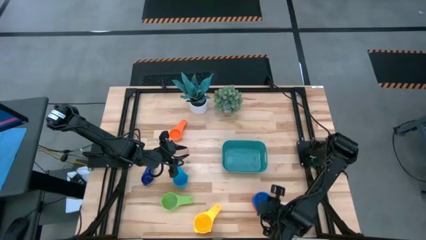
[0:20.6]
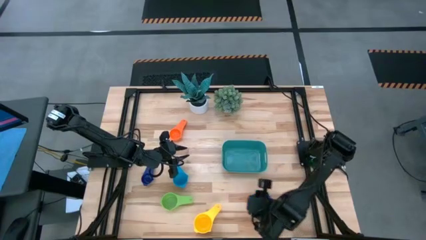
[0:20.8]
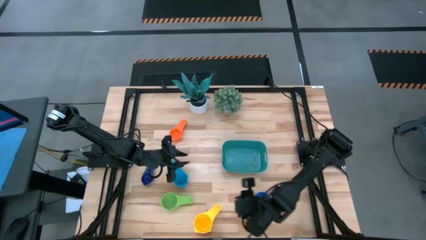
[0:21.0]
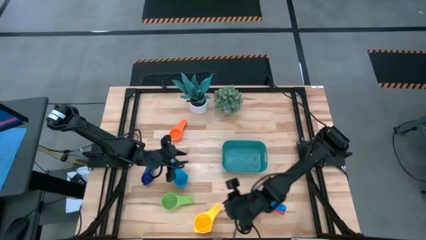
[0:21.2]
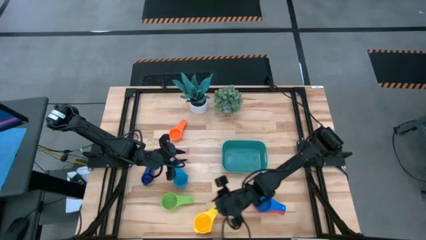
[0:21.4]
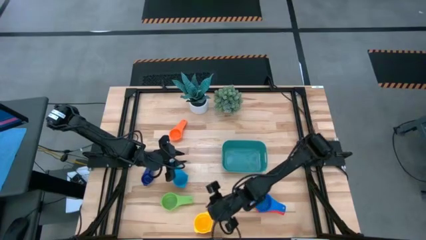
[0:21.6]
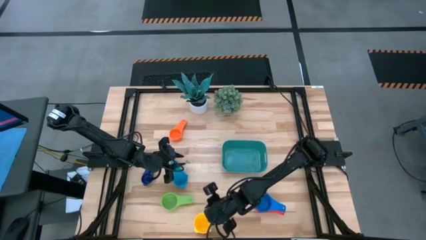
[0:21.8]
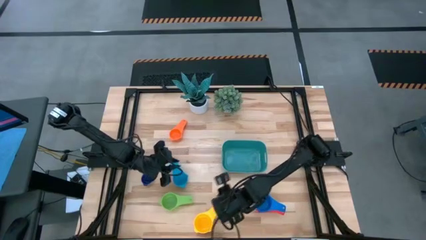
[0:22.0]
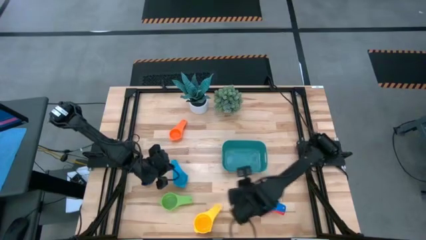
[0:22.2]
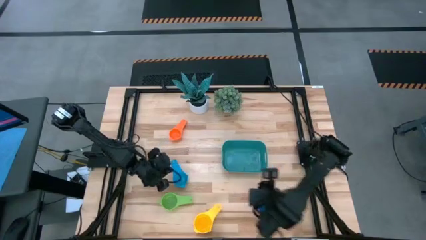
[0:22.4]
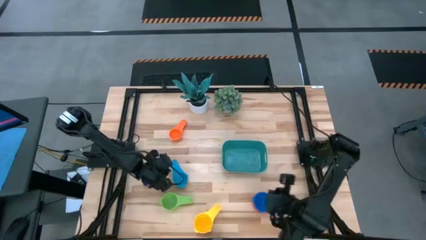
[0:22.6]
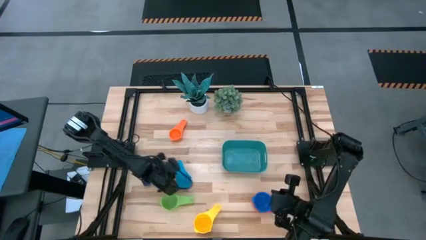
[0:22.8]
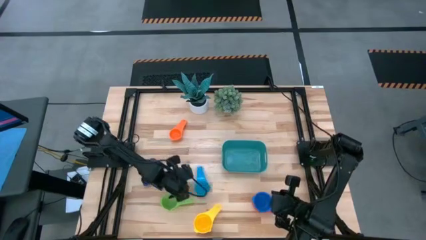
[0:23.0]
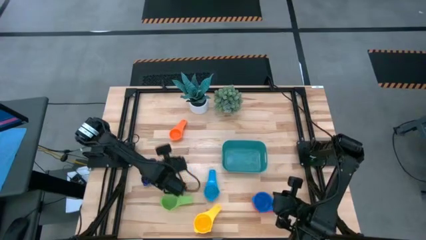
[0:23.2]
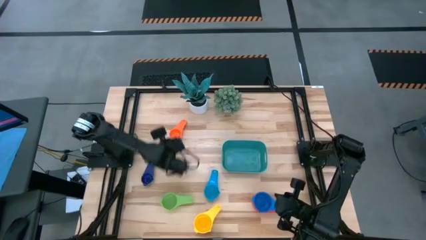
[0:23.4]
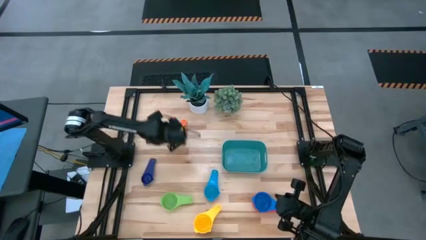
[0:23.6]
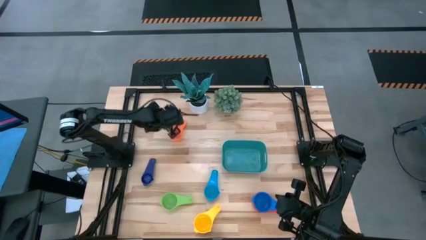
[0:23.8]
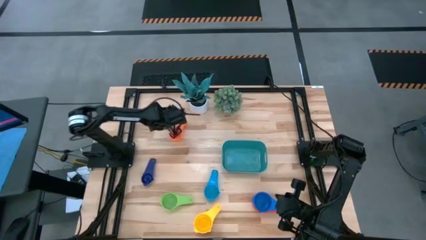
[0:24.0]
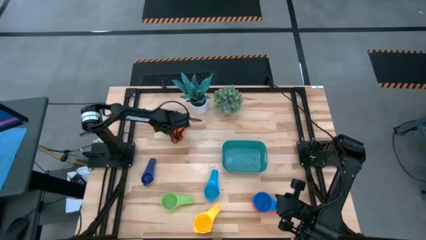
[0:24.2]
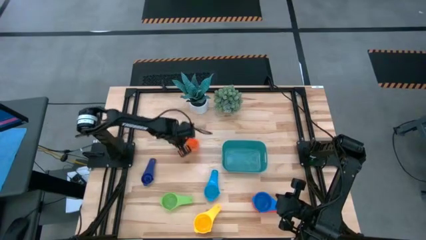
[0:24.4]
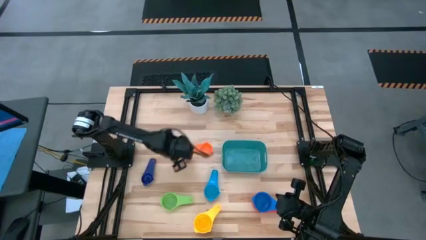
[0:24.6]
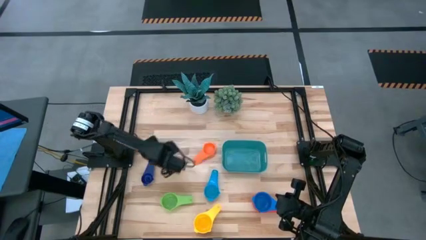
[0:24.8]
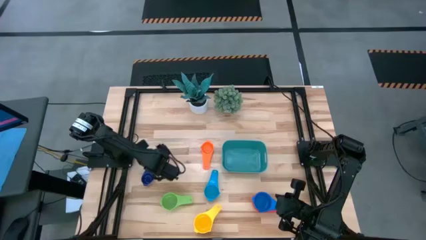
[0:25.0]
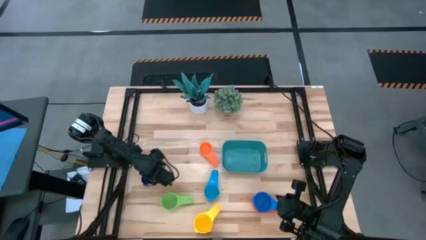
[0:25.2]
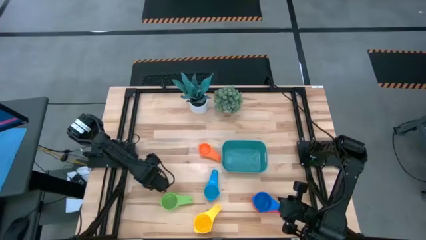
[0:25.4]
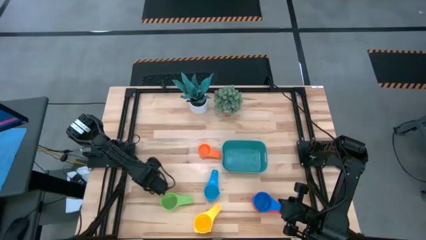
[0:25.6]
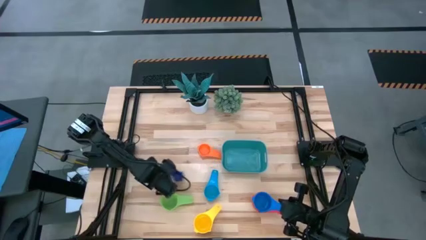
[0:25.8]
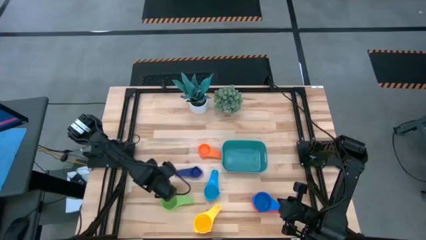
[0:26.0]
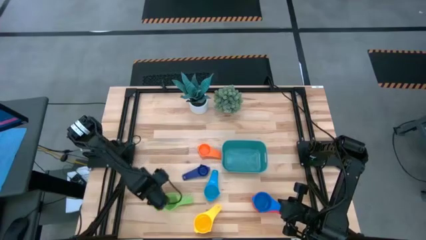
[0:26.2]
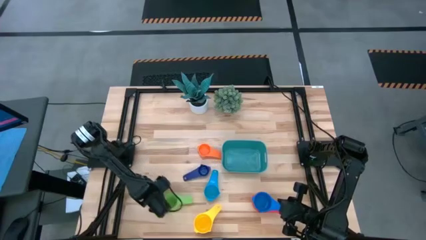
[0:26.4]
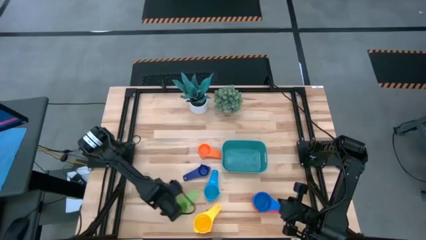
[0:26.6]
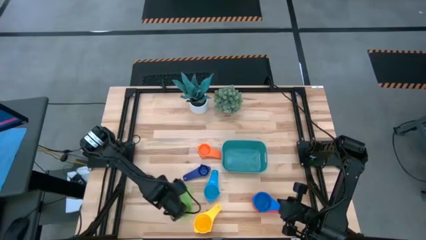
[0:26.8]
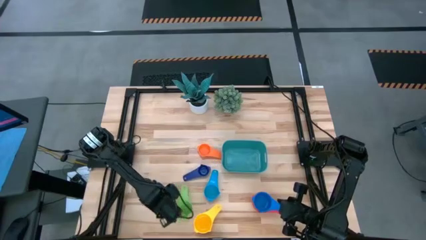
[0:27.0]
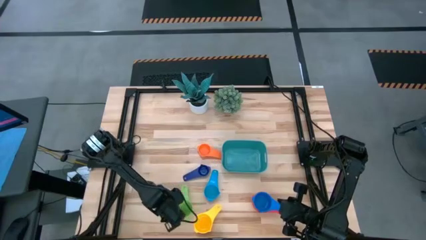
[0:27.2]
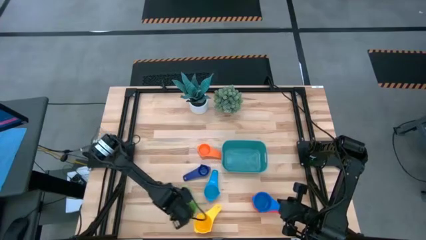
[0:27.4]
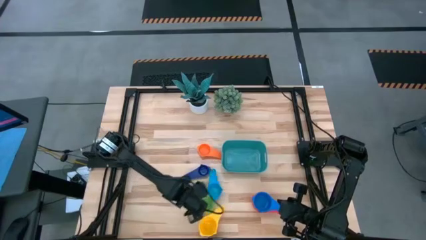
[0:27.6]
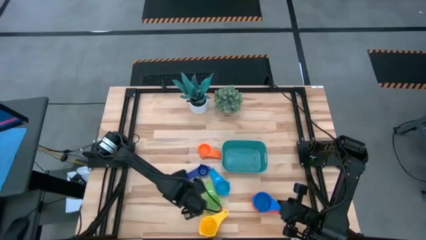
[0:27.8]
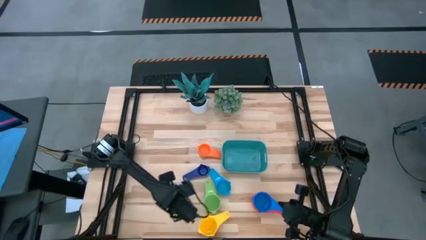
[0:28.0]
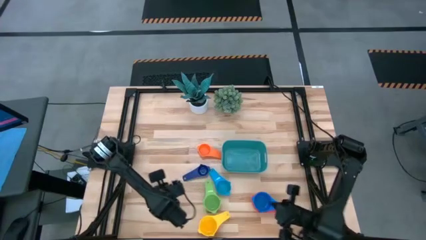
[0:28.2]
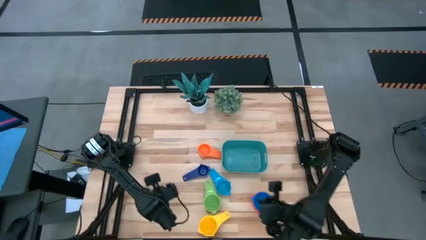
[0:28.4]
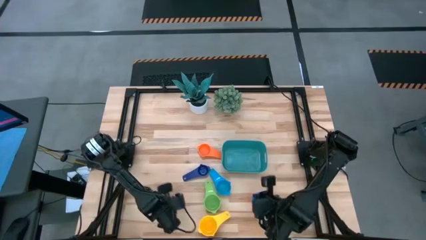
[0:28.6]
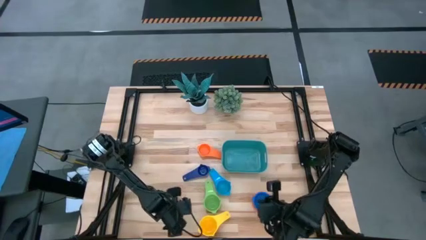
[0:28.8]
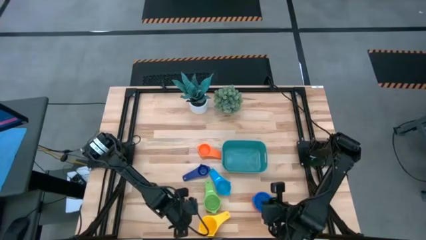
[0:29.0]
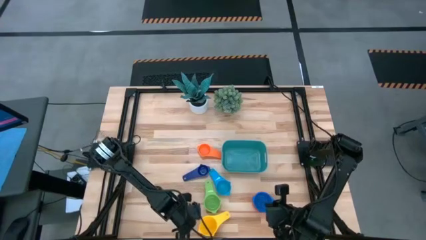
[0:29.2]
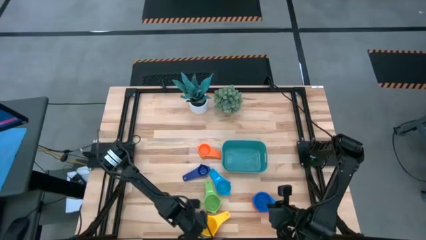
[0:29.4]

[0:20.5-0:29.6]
Task: Nest measuring cups in basket
Prepare the measuring cups

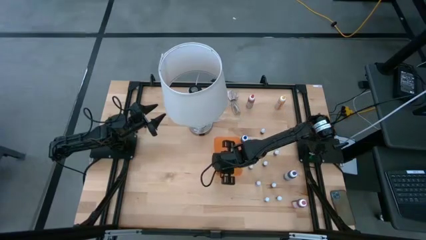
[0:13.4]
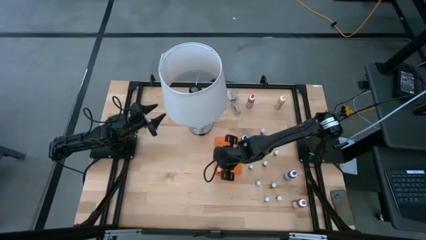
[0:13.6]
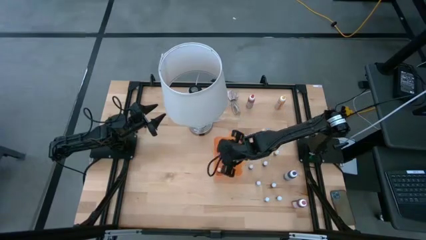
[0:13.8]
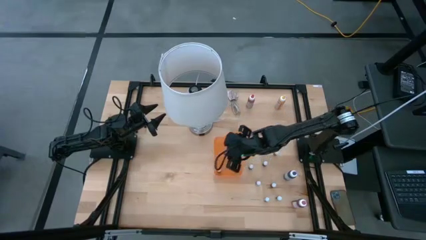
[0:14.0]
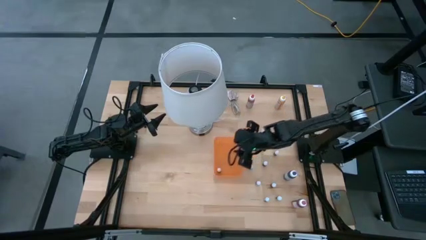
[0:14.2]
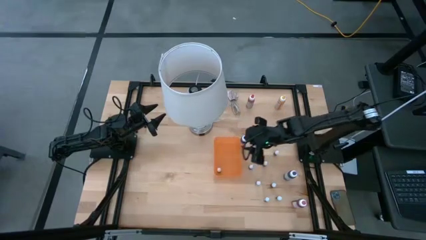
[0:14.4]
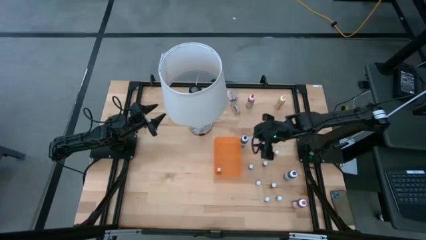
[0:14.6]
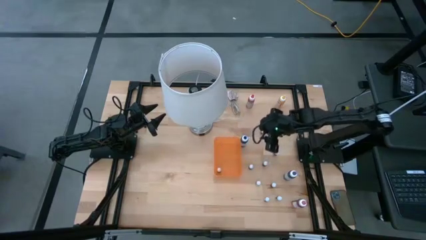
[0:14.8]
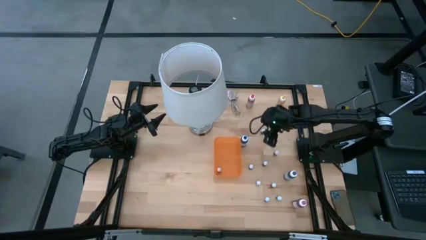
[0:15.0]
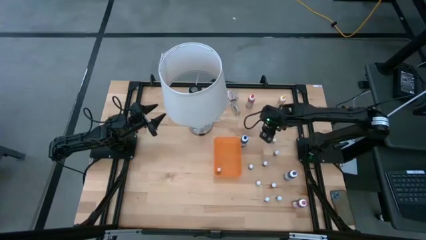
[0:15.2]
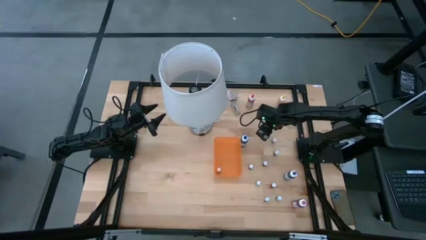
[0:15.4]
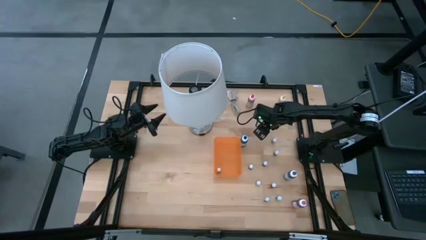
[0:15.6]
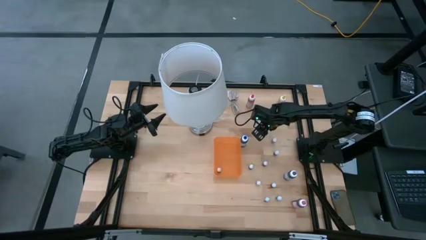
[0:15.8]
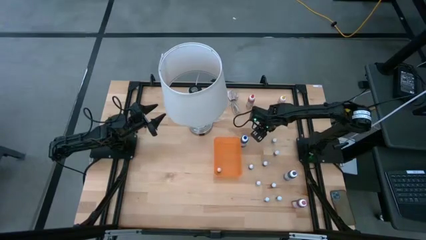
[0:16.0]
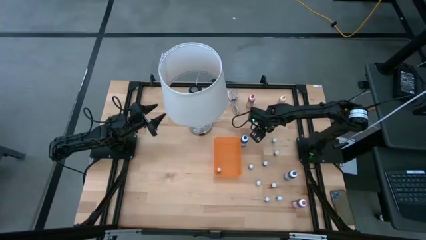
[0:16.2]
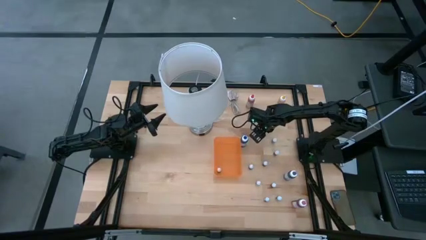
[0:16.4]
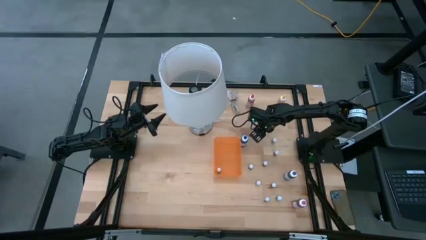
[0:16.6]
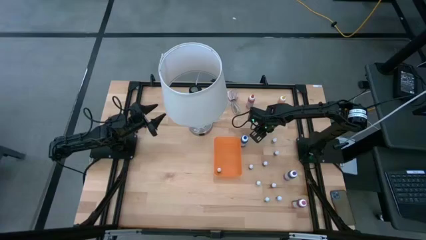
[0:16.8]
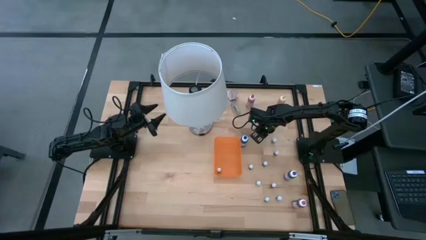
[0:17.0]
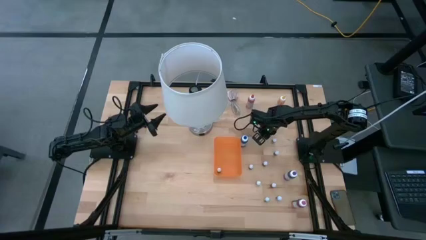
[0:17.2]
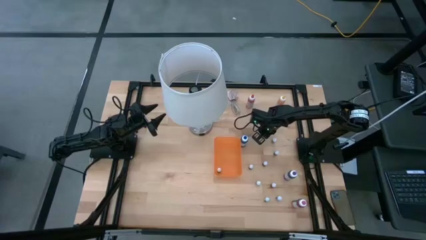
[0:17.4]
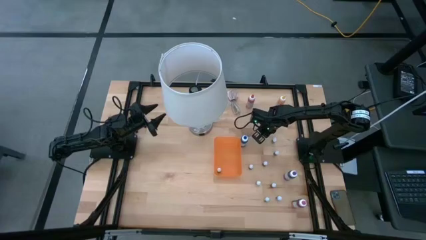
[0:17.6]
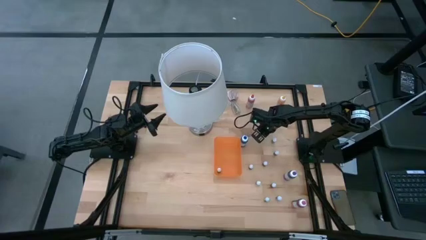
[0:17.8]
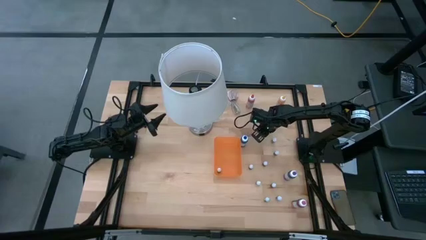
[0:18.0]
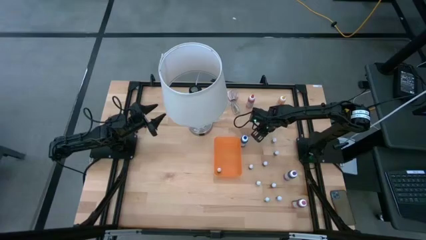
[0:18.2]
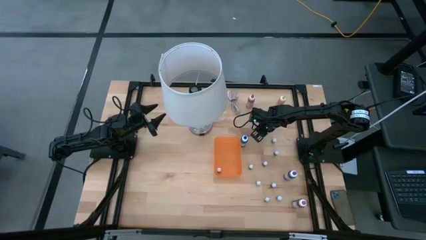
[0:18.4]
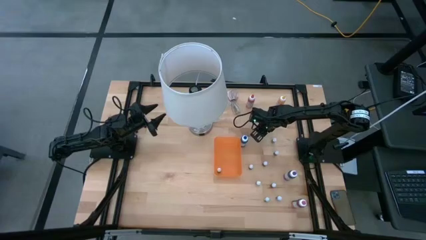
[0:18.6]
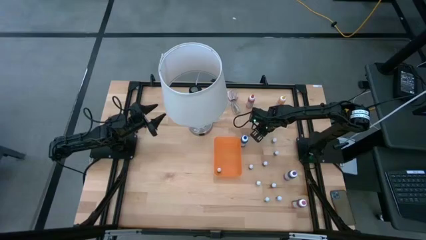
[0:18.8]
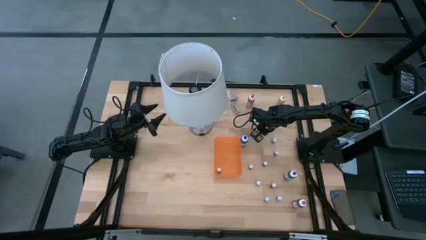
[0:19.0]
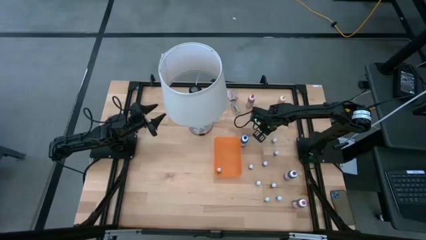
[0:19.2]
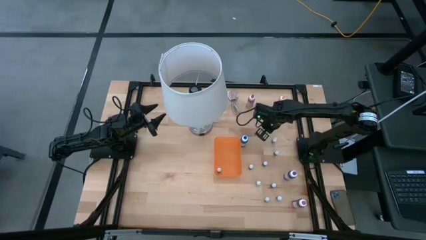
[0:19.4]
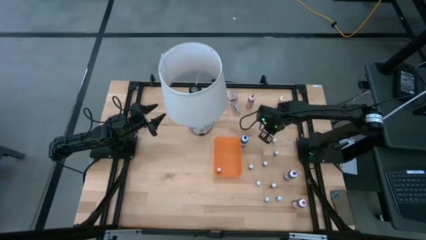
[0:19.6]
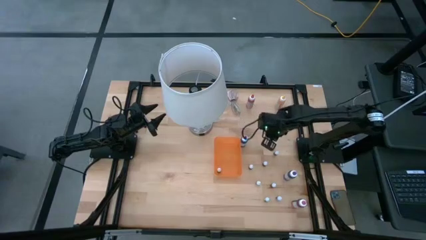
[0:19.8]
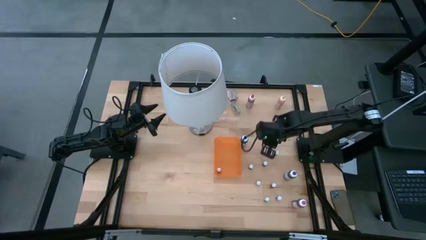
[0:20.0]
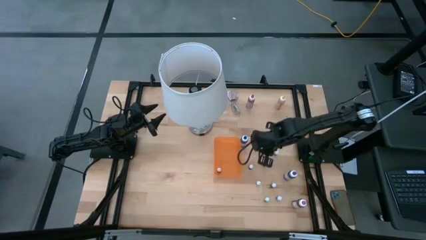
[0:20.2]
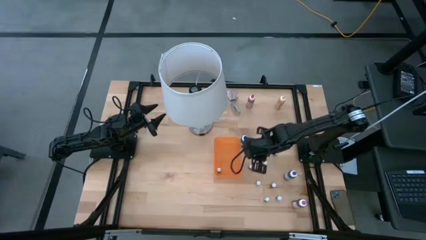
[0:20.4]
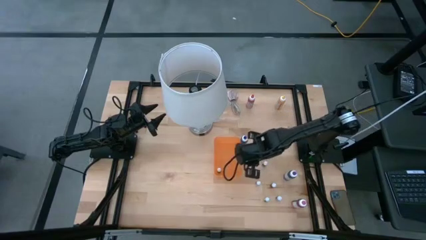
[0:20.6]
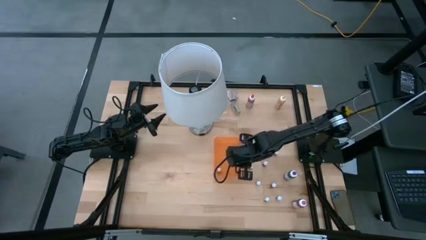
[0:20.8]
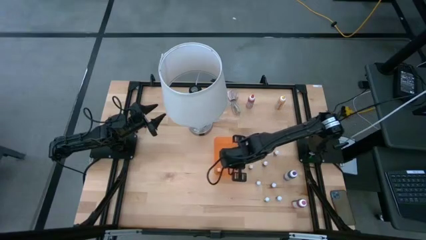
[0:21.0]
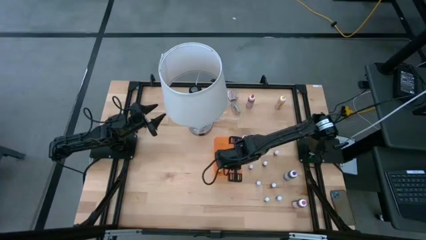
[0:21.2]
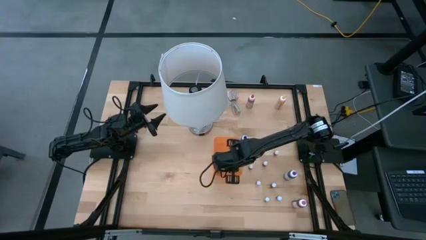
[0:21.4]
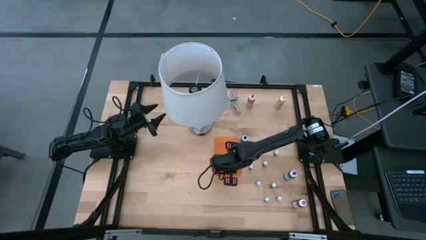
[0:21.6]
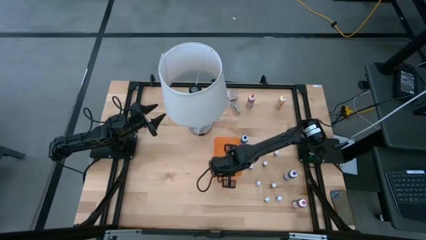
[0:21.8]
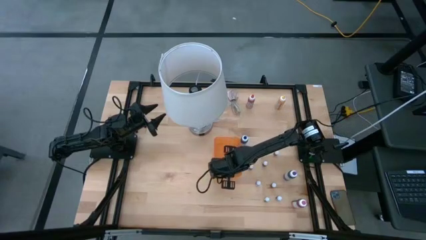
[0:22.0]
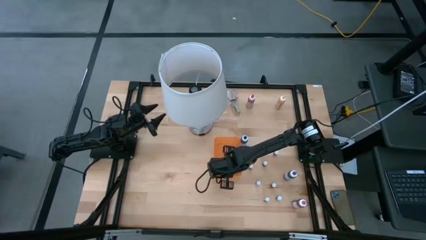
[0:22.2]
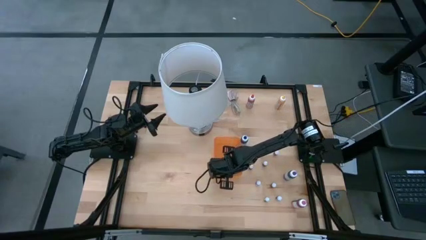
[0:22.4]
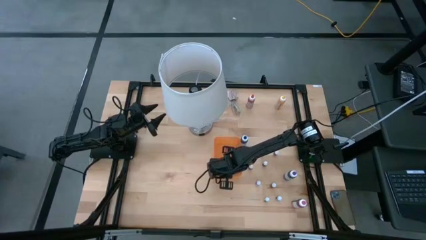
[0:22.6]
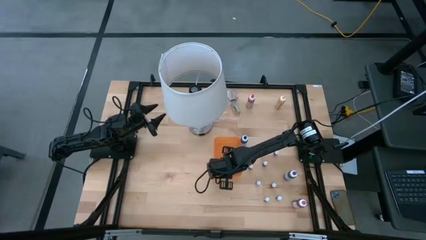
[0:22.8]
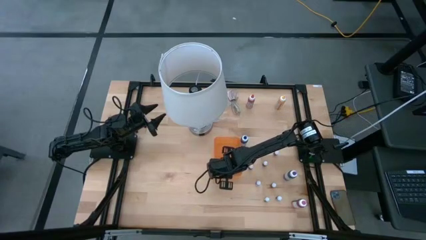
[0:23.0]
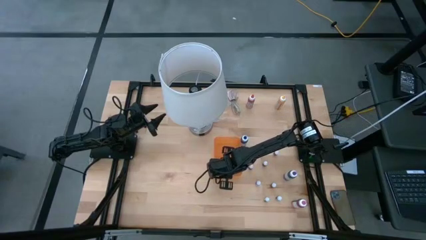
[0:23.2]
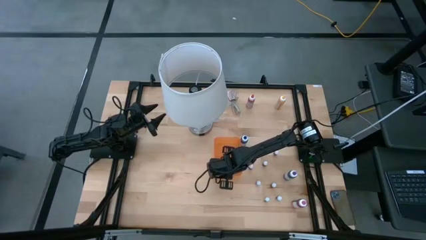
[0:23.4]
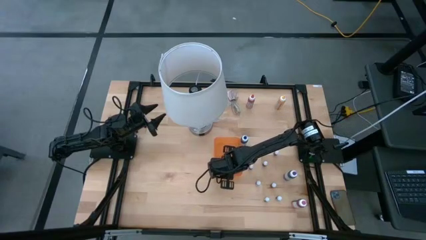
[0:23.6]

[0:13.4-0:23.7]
Task: Pick & Place food coloring
Put the small black food coloring bottle into the orange bin
